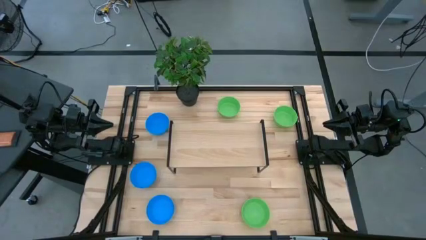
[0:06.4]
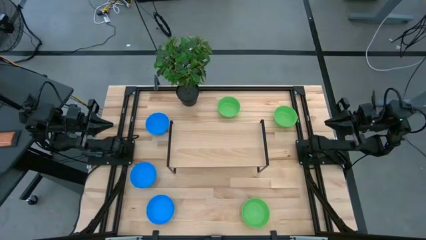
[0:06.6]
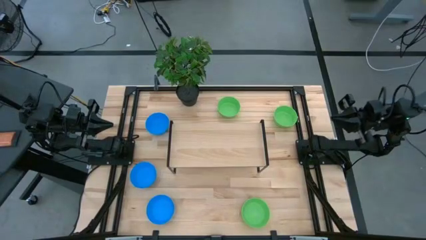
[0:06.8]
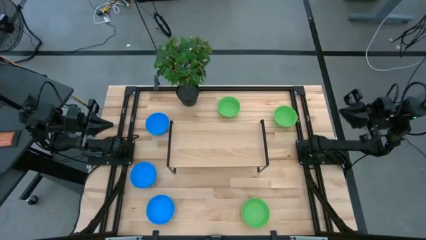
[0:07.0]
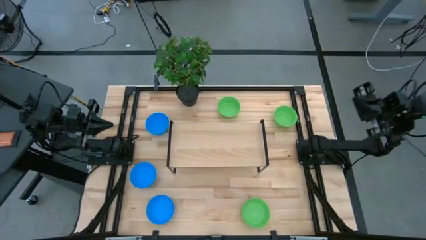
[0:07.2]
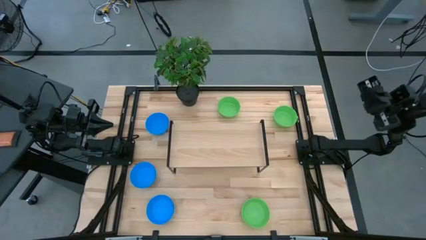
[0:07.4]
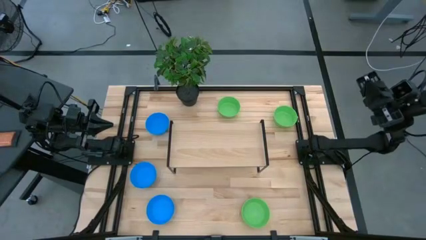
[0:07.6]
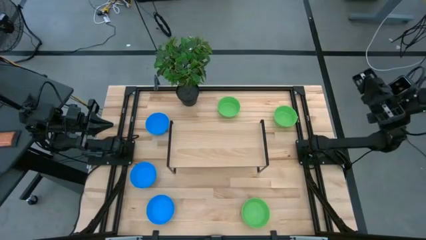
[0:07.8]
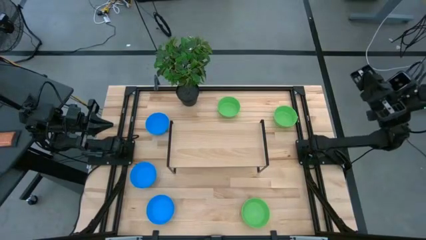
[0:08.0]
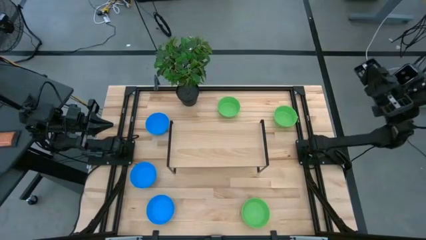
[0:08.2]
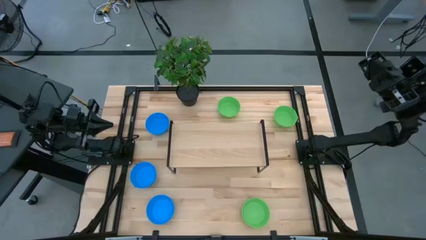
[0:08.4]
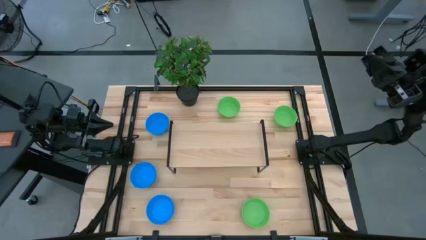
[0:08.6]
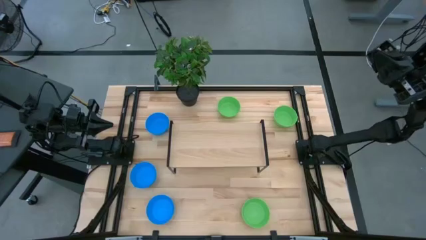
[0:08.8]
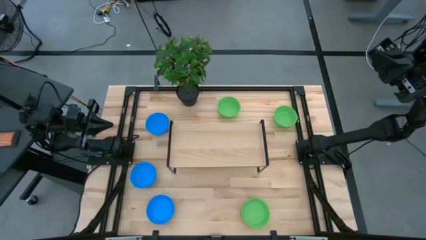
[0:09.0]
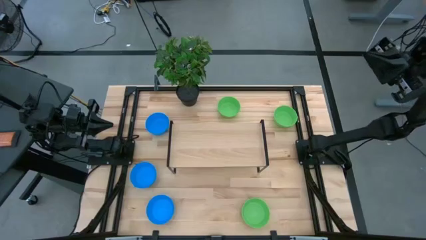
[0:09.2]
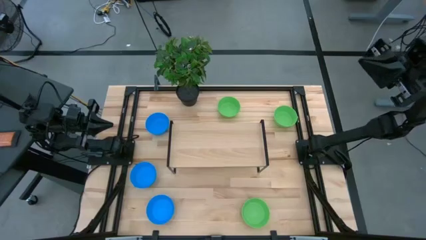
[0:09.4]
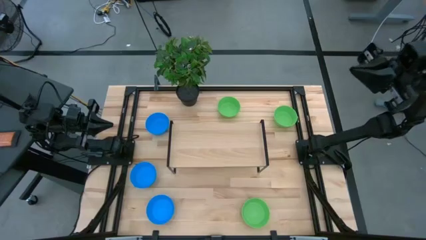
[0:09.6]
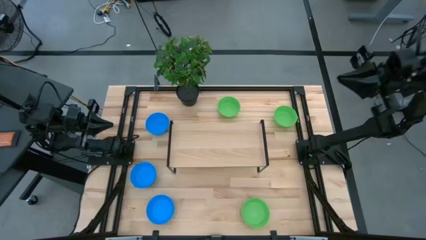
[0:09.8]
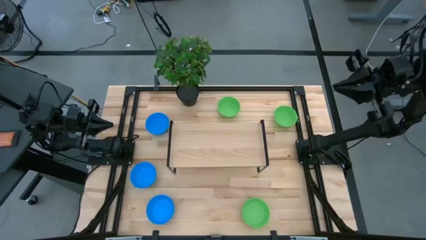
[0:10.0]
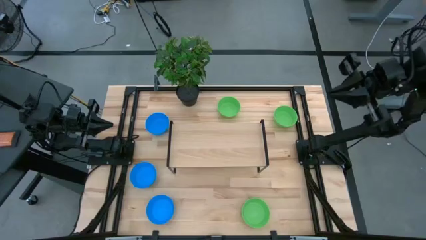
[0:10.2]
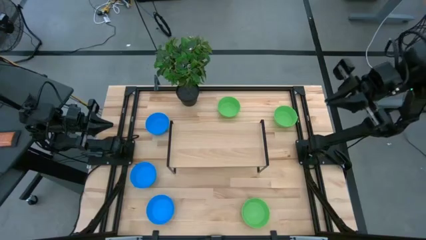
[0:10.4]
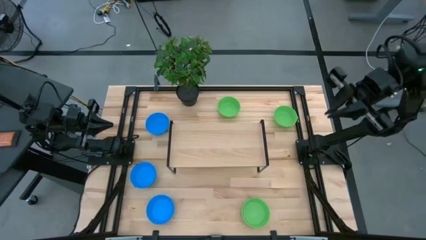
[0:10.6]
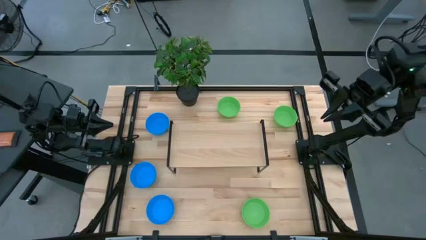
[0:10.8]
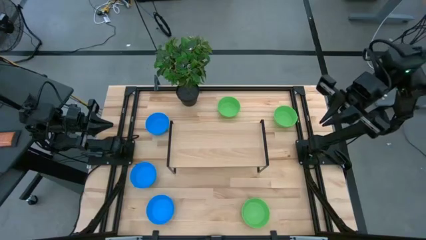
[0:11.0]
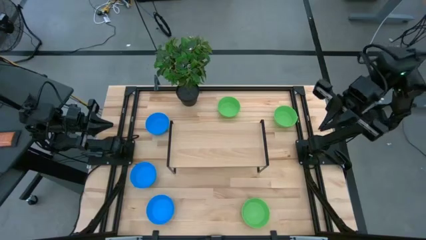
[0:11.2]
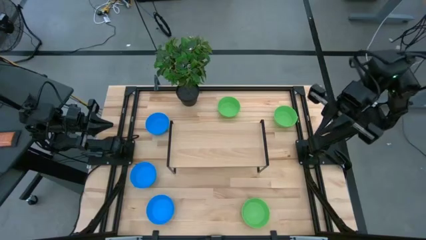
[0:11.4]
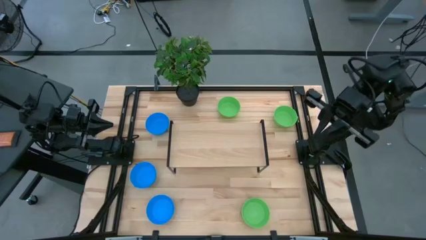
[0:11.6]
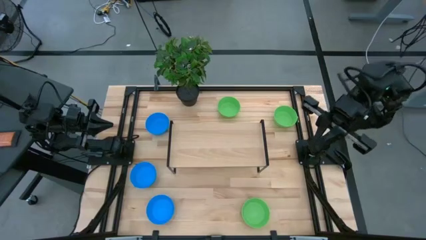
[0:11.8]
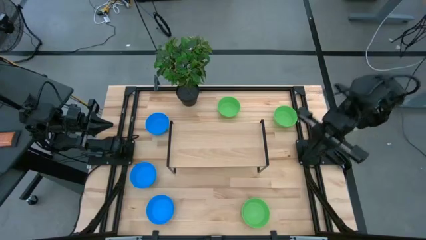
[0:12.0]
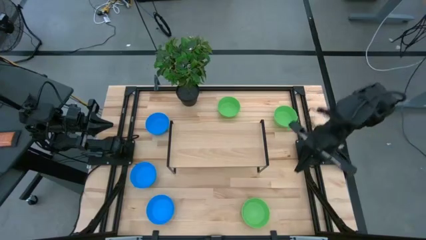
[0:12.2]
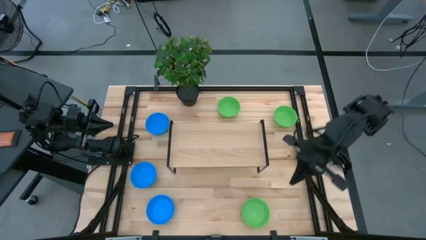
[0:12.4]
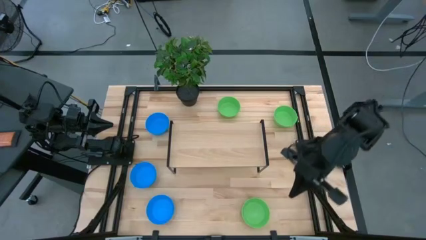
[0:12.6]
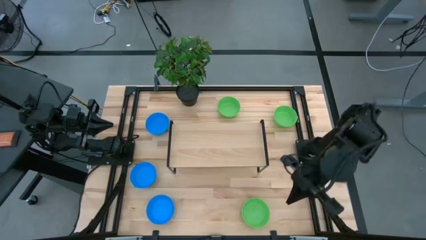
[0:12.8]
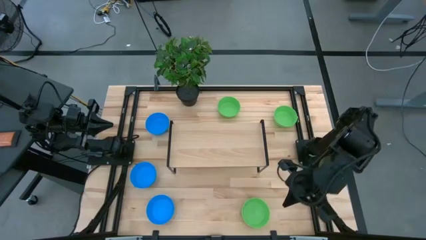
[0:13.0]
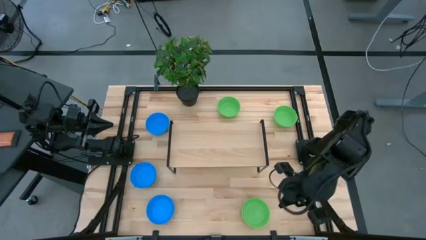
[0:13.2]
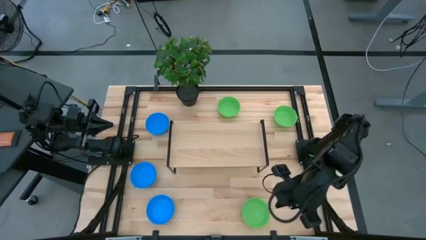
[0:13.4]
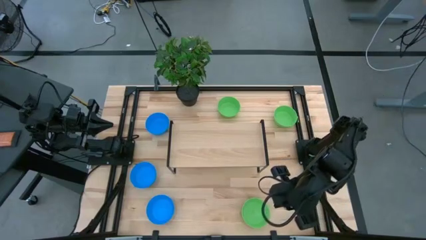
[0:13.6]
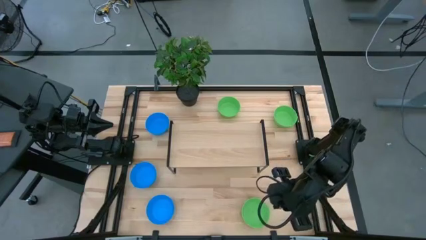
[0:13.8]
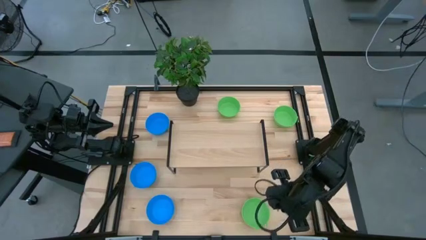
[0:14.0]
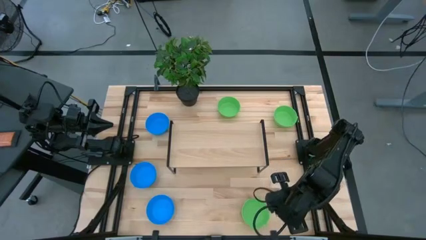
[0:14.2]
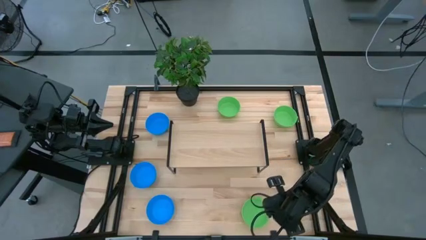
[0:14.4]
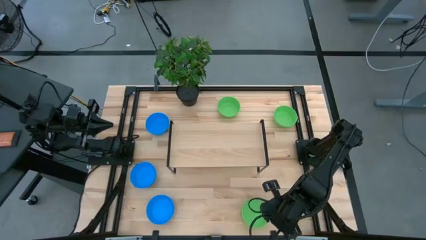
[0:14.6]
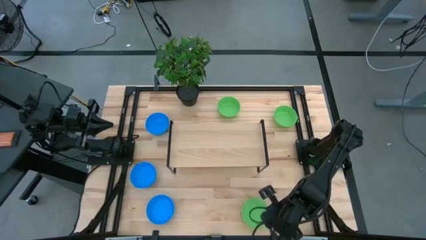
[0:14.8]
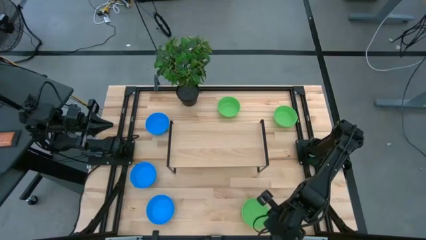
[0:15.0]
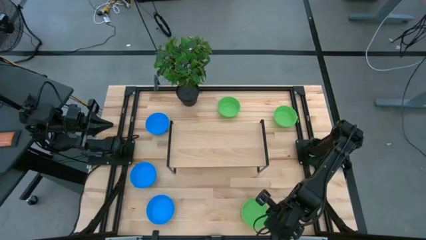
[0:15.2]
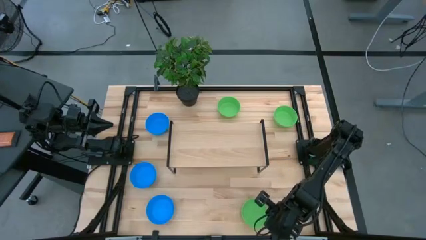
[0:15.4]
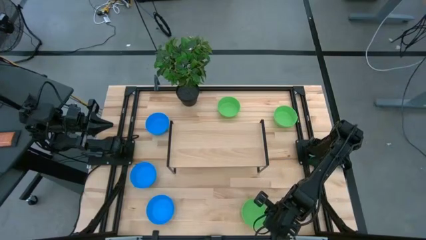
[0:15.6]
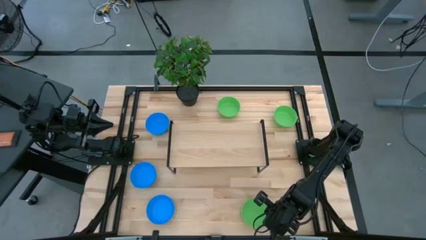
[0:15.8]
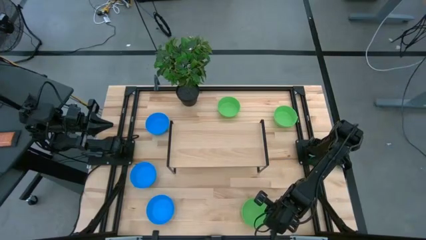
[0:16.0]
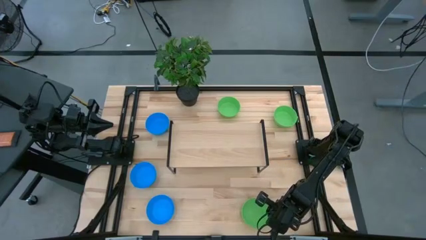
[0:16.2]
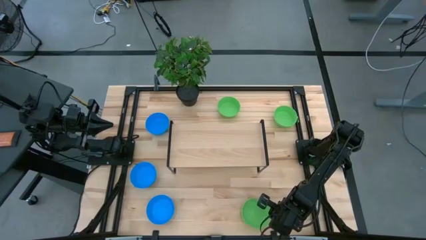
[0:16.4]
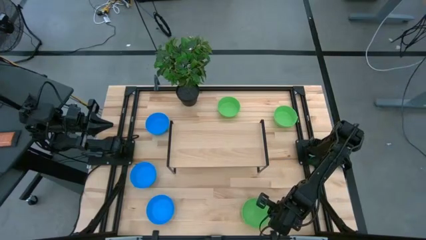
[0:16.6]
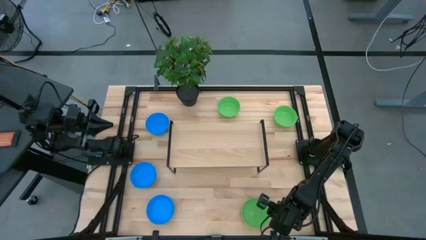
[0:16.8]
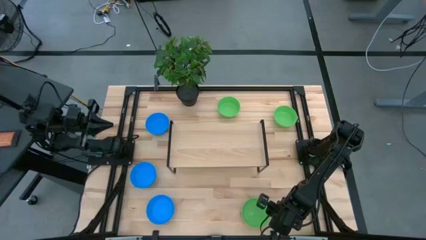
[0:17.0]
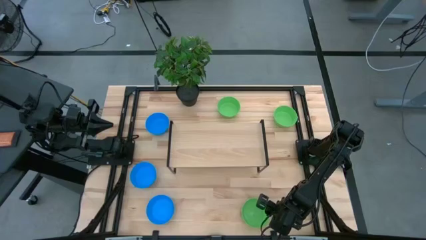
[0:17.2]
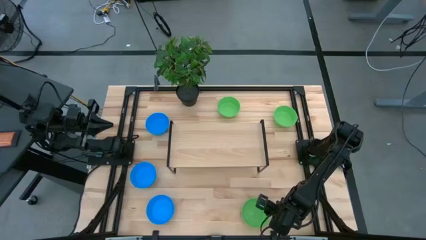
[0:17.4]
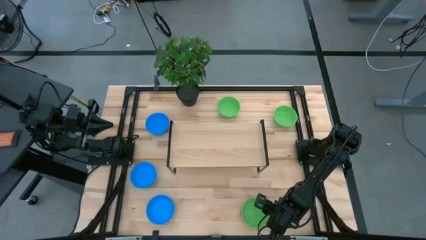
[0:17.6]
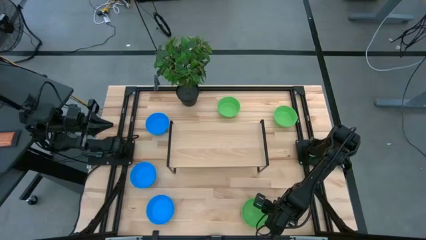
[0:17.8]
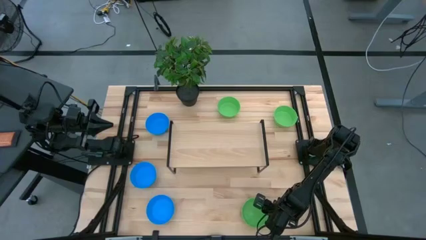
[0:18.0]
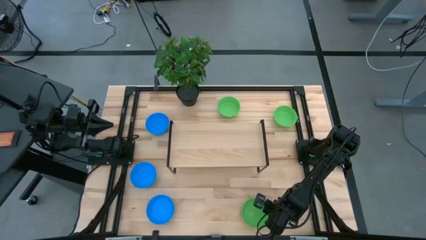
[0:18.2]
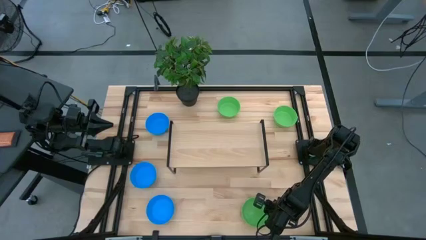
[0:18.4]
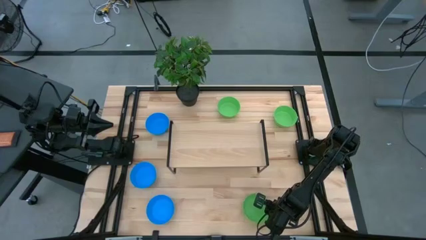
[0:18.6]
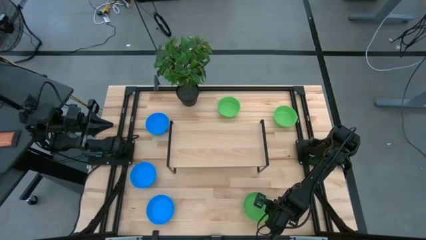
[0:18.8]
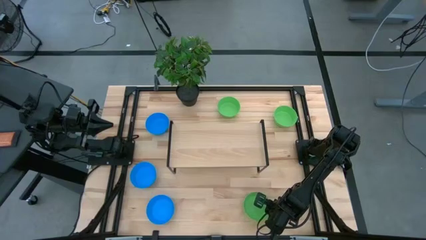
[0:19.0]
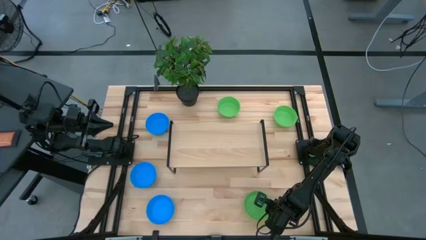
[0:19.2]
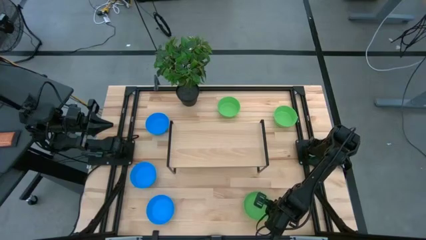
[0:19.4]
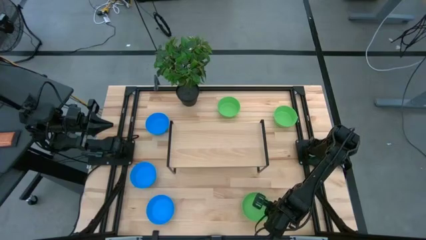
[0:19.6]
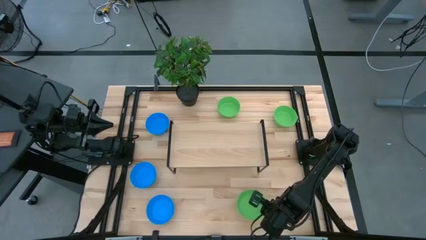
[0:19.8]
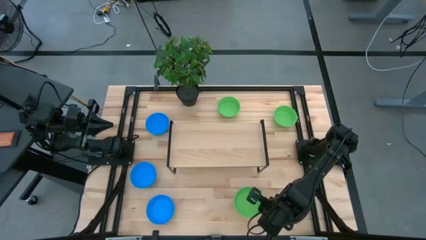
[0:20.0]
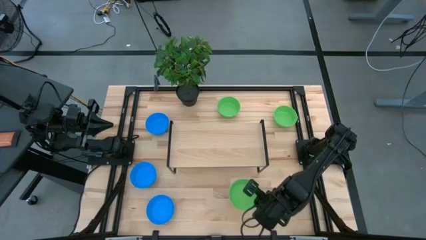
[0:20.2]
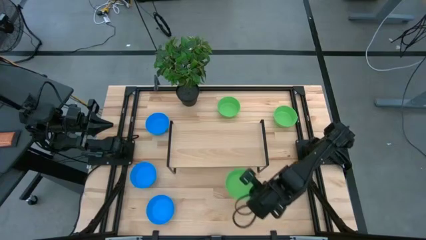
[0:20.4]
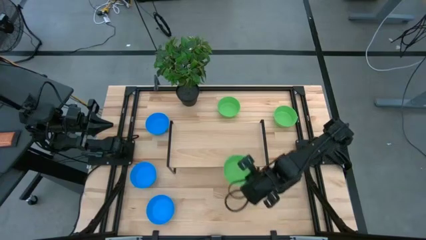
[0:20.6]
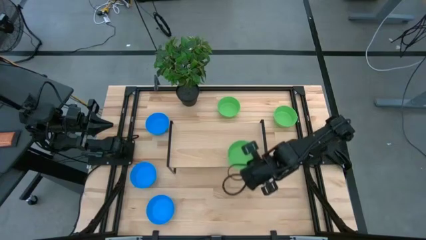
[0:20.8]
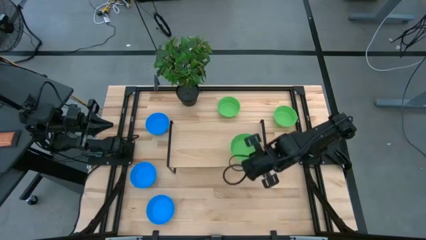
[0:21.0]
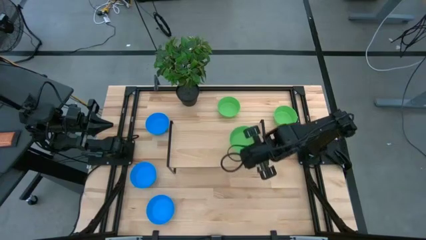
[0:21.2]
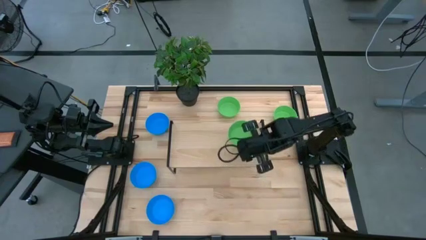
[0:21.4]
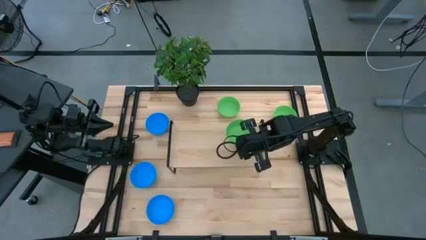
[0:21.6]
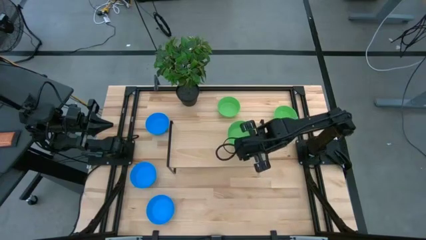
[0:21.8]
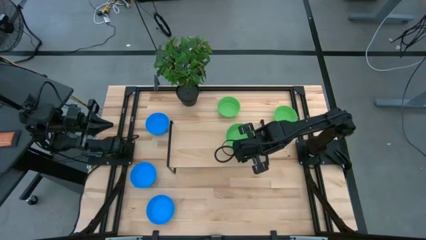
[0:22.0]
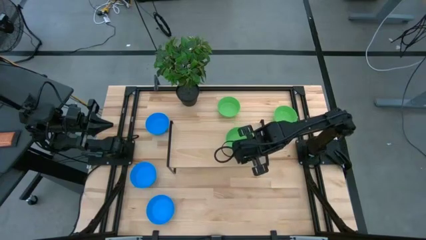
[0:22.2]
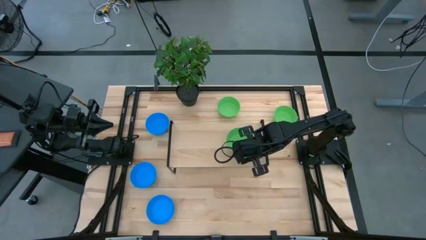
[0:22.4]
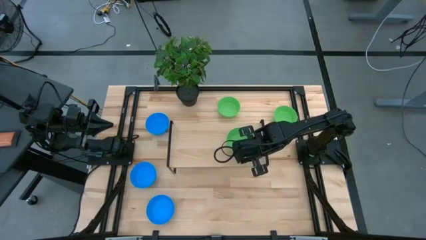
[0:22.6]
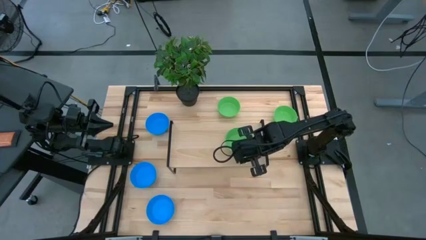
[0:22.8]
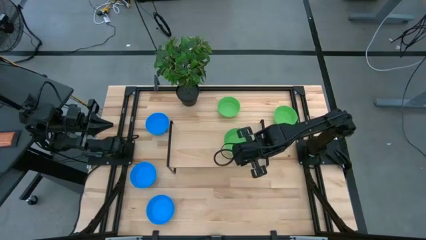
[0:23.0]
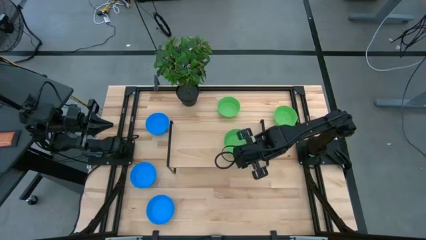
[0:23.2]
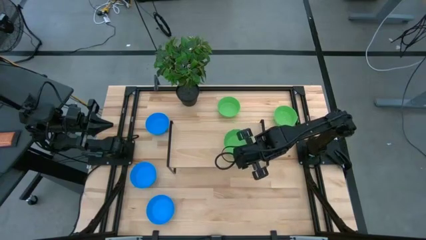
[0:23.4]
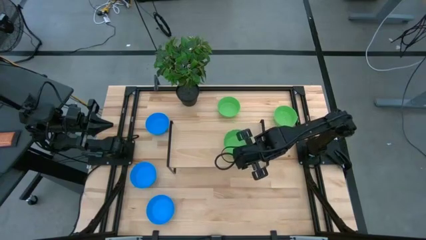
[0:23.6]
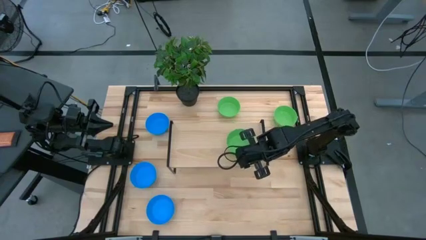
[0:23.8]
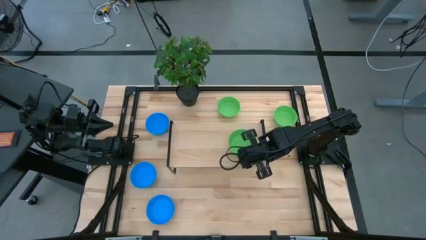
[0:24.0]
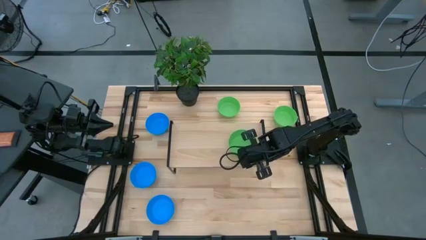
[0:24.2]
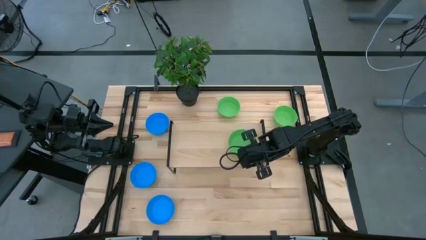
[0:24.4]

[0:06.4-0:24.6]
Task: Pick & Place Mini bowls
Put the bottom green bowl on the shelf
